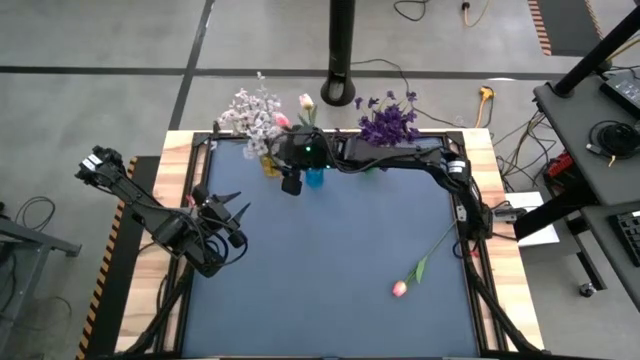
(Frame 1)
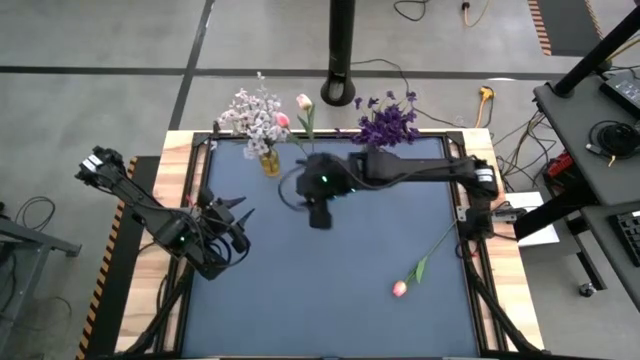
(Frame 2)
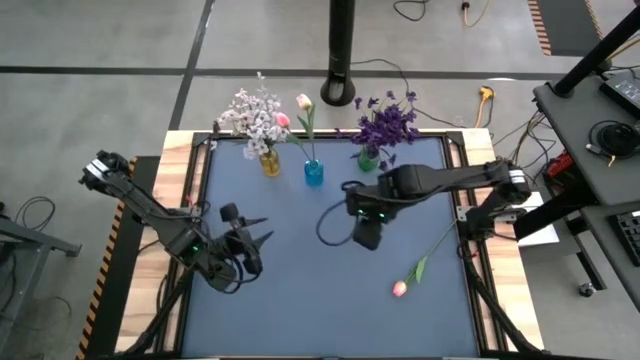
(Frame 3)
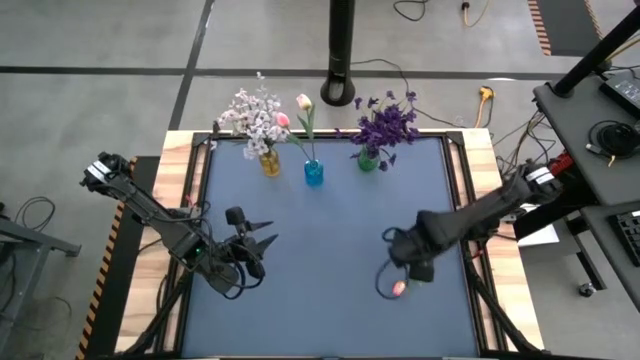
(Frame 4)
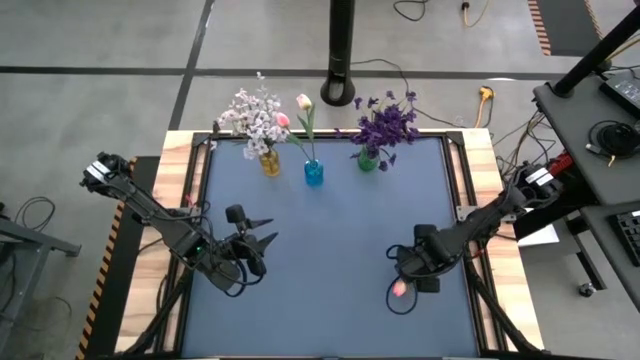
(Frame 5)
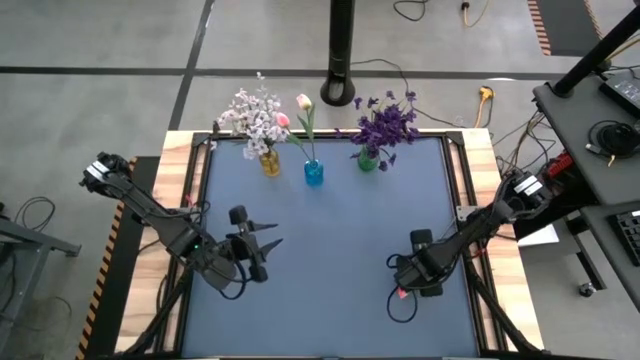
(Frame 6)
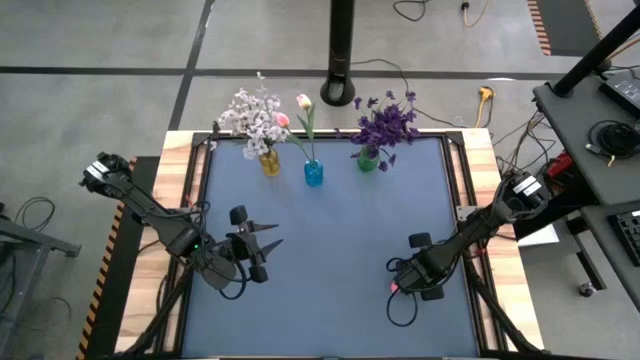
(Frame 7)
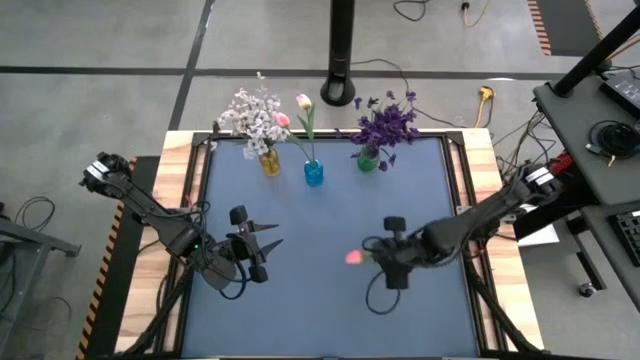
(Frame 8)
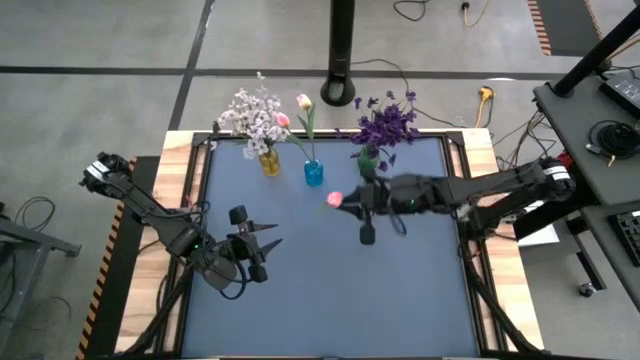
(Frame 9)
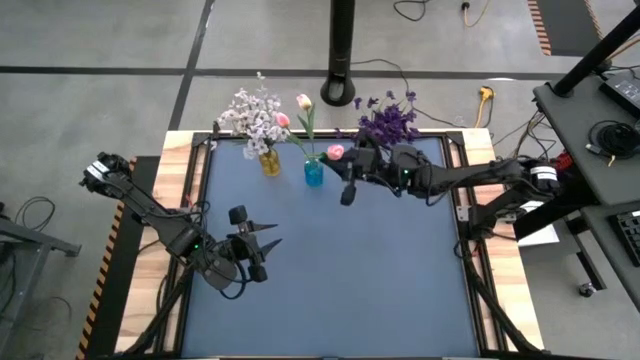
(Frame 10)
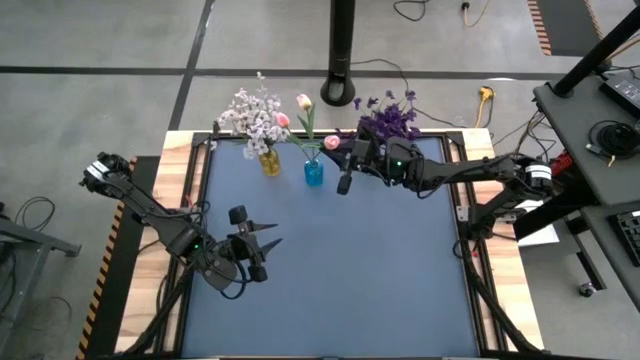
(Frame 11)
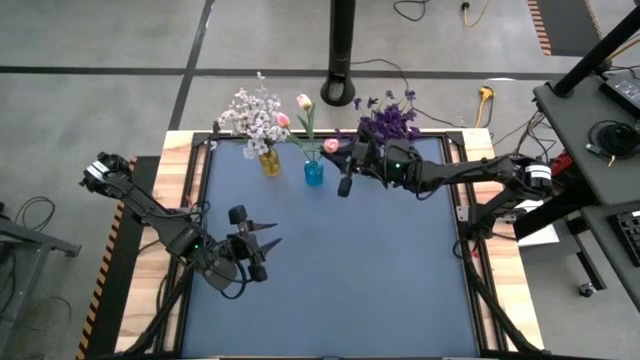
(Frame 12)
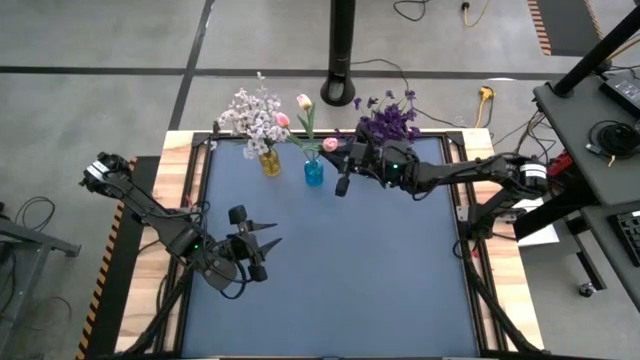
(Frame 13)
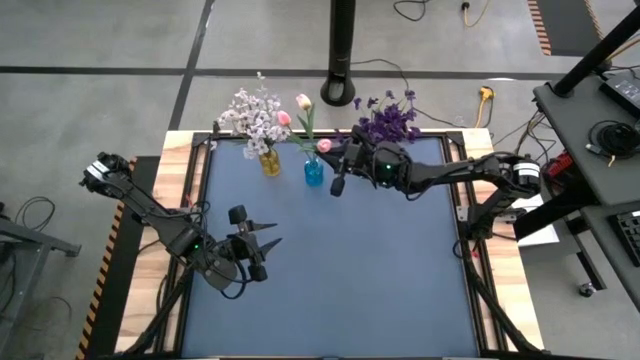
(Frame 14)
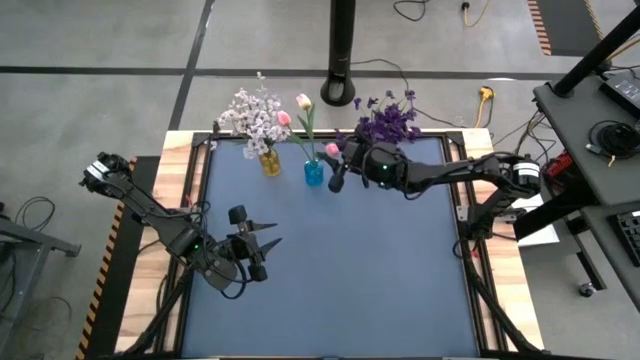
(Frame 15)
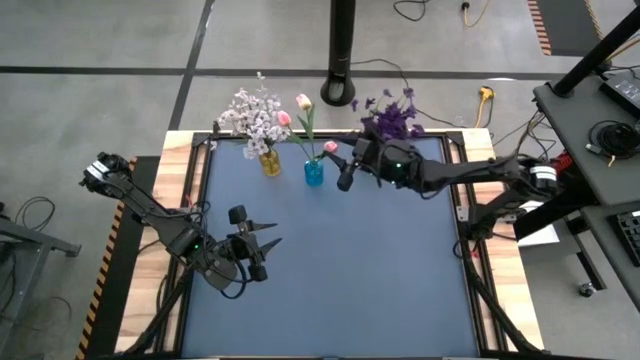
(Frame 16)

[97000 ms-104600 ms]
Task: Sort flowers into vase by color
Put the pink flower into the blue vase

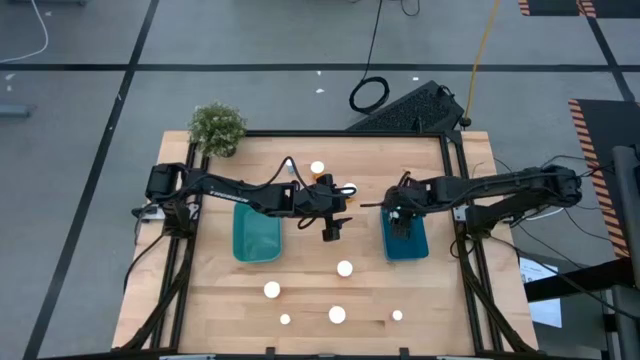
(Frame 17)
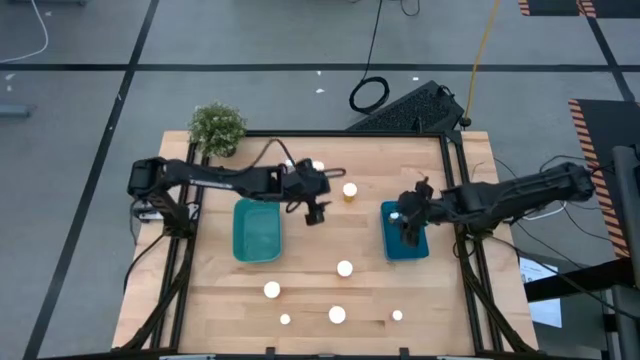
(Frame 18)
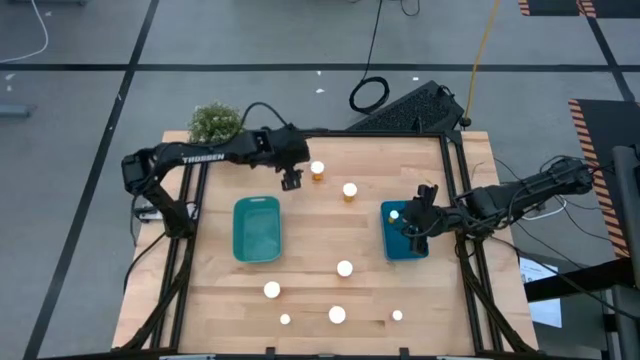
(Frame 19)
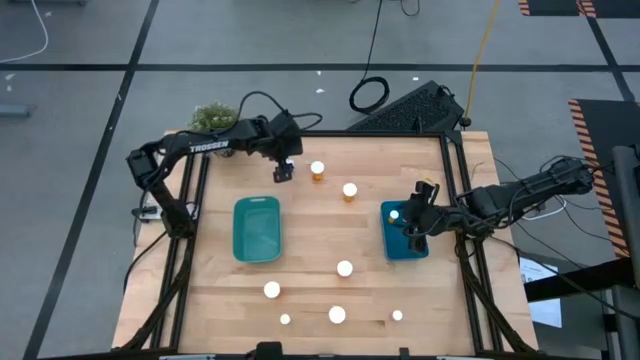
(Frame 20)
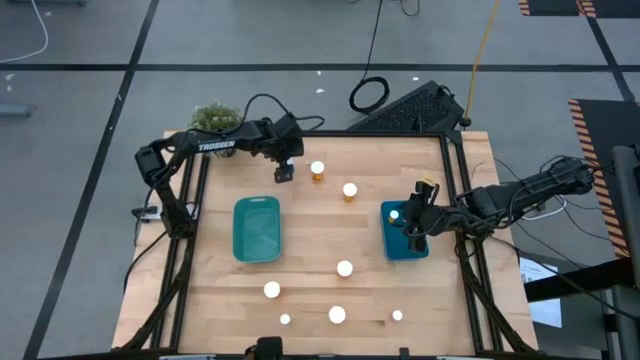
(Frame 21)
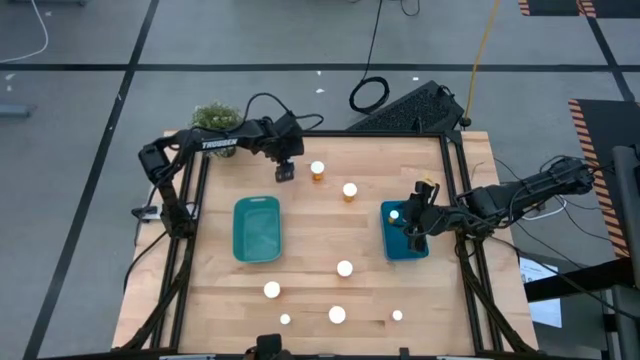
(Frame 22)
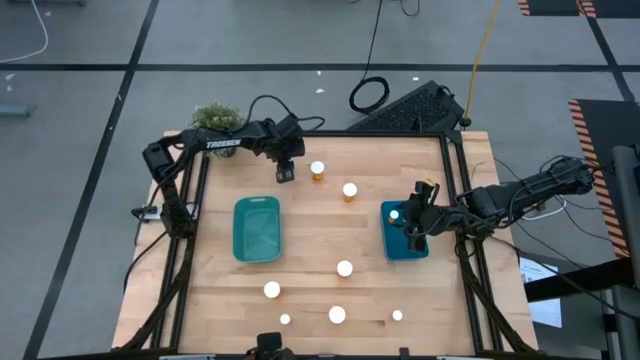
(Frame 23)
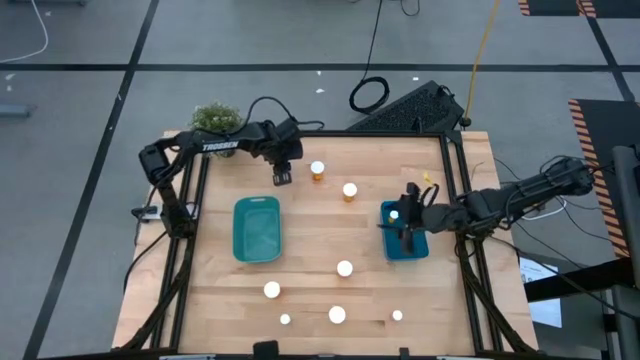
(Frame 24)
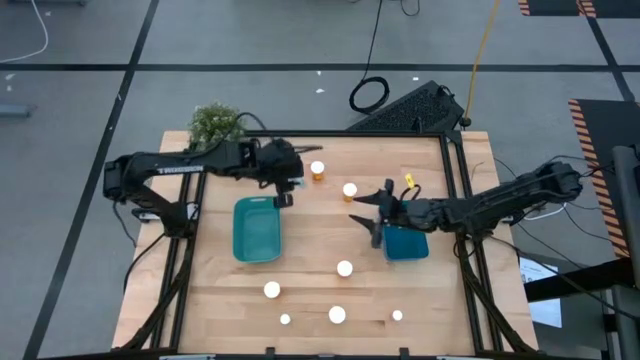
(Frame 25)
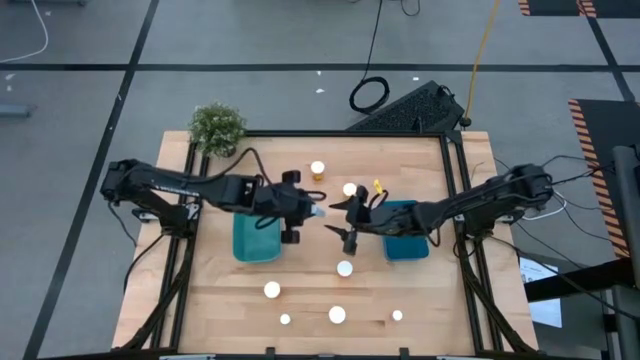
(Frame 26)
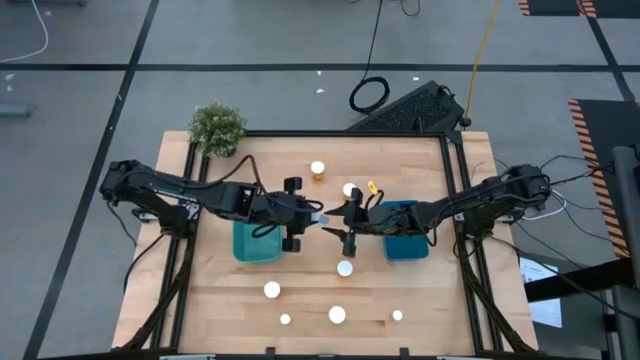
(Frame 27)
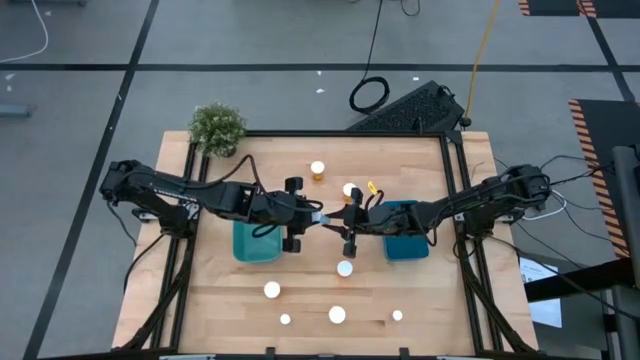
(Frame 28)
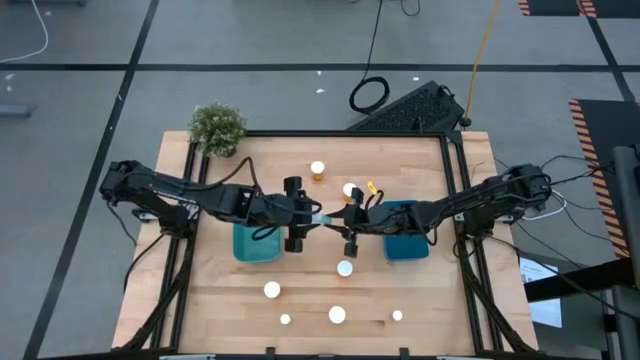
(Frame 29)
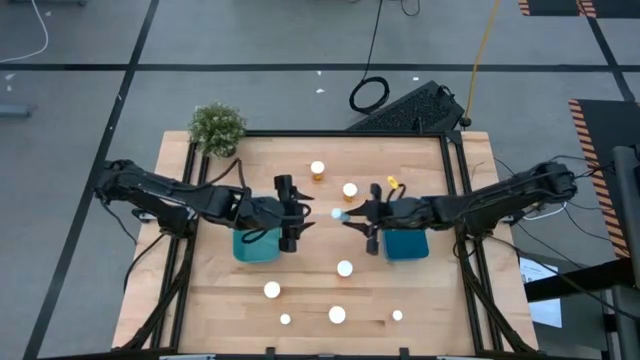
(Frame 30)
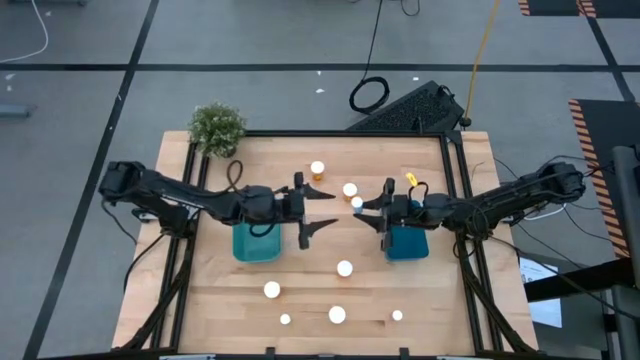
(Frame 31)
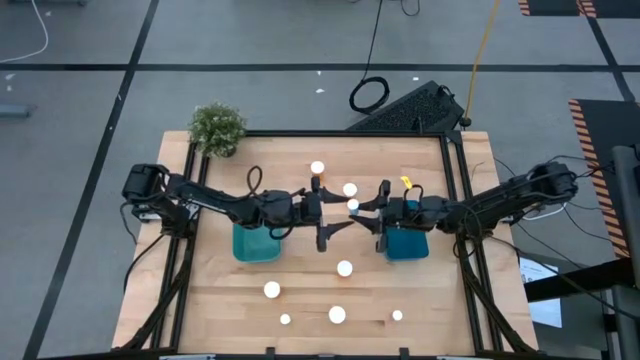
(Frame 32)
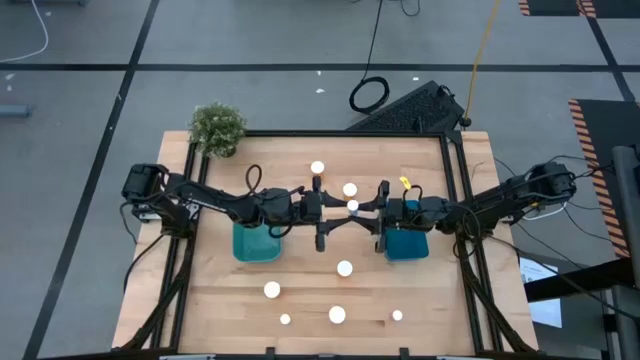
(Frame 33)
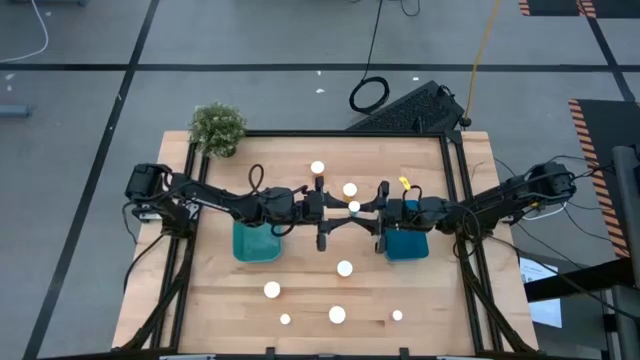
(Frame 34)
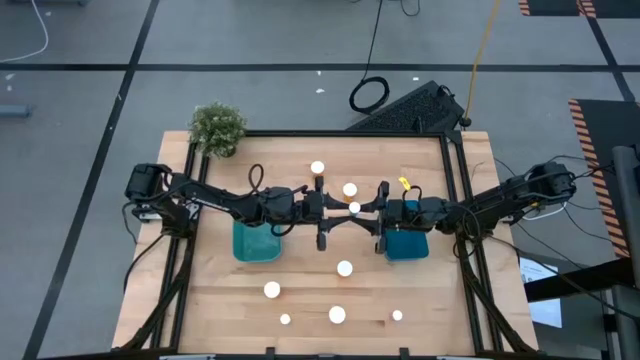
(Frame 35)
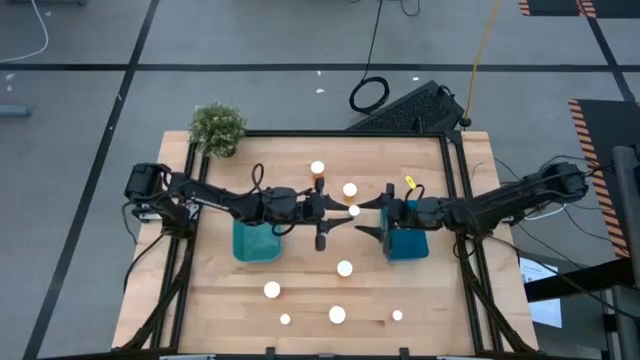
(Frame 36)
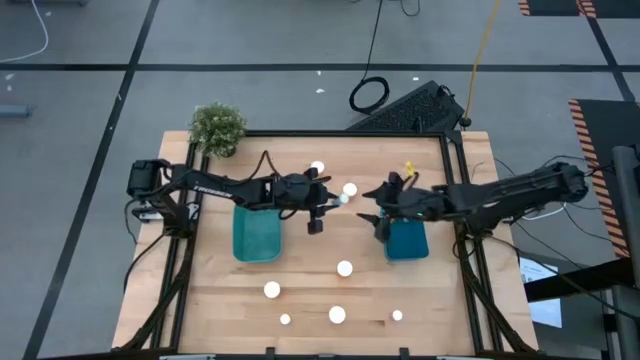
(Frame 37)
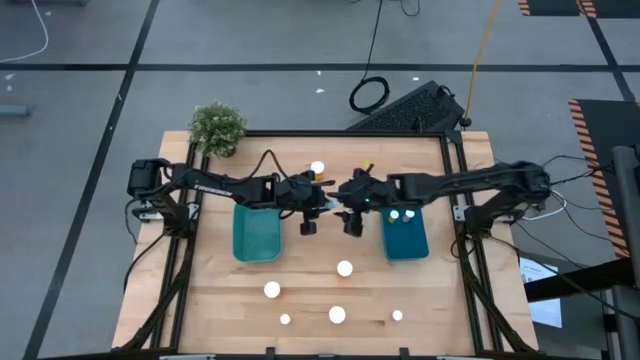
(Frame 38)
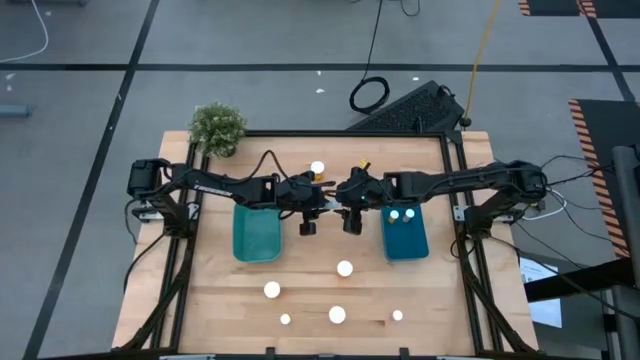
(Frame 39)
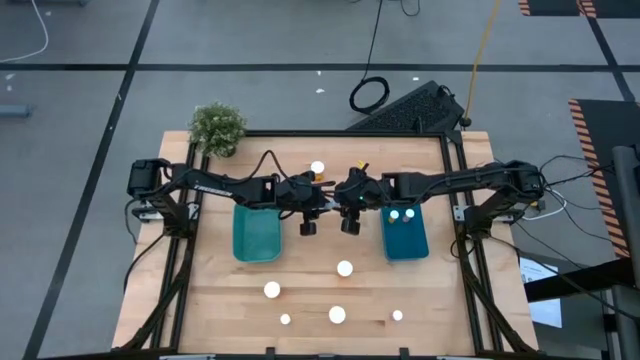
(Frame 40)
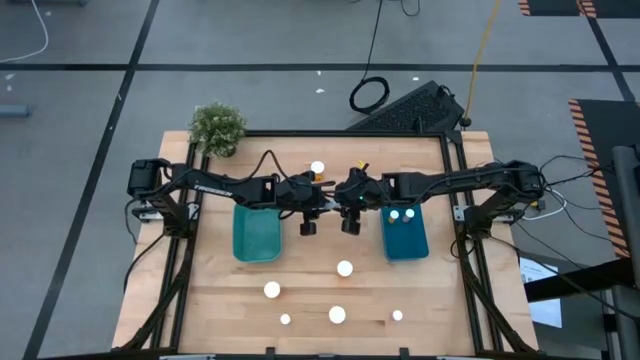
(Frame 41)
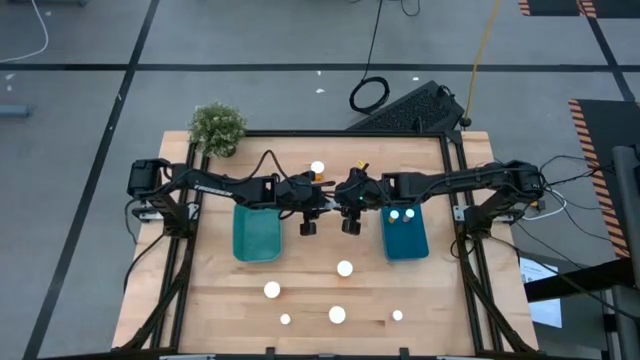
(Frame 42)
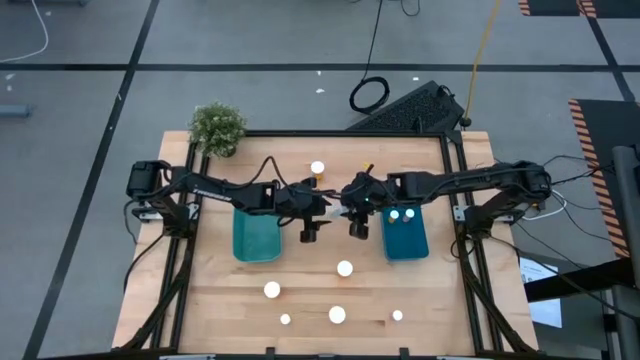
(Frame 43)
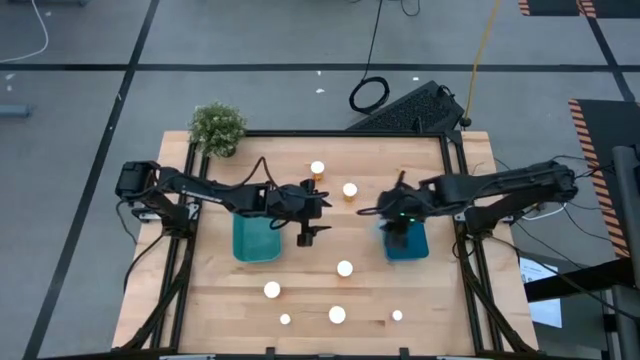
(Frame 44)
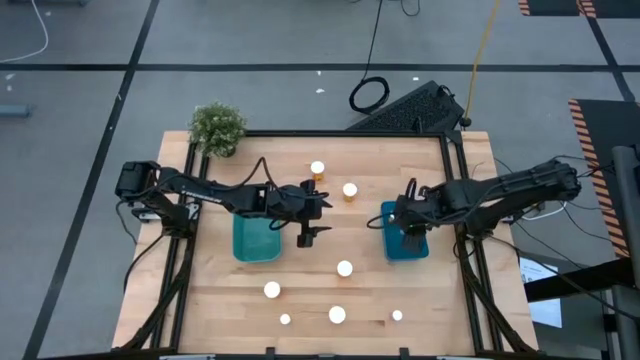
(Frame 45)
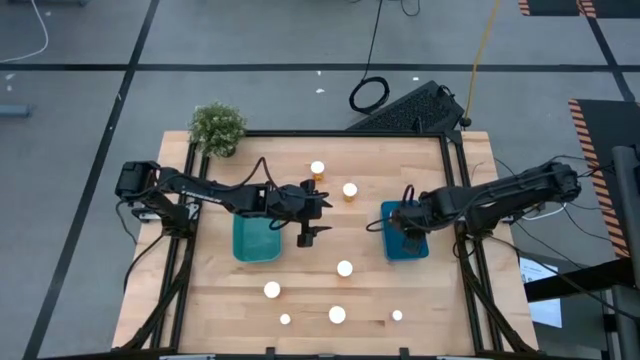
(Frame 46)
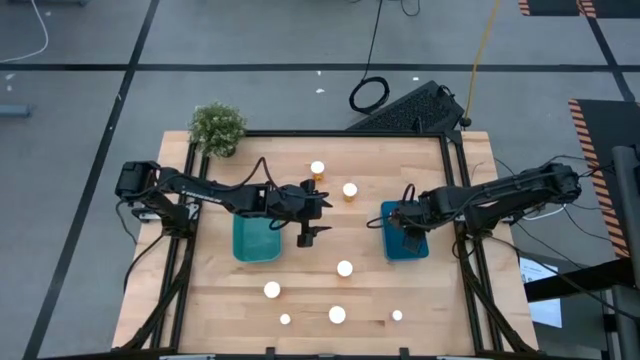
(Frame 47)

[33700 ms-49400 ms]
Task: Pick and place medicine bottles into bin by pill shape (circle, oval)
Put the blue tablet bottle into the blue bin
